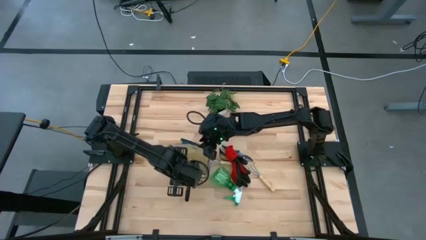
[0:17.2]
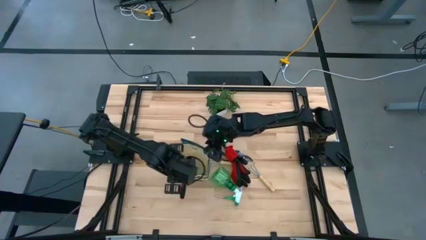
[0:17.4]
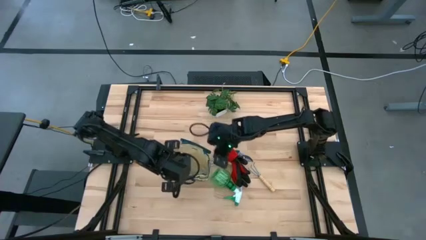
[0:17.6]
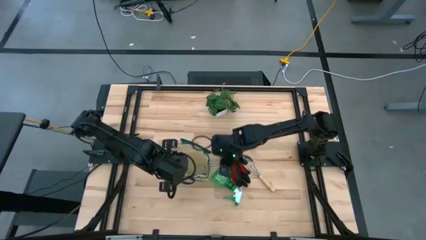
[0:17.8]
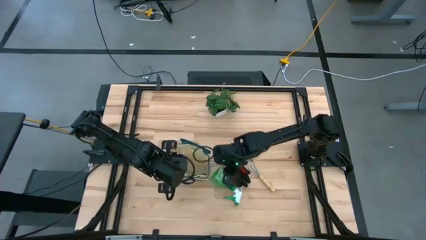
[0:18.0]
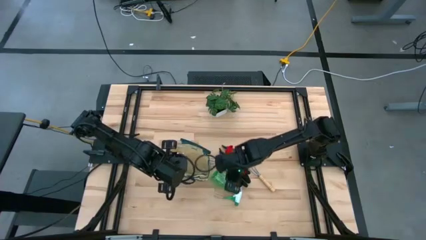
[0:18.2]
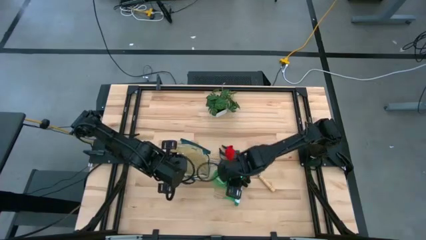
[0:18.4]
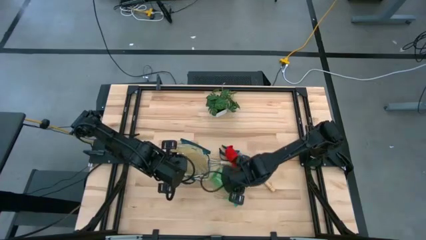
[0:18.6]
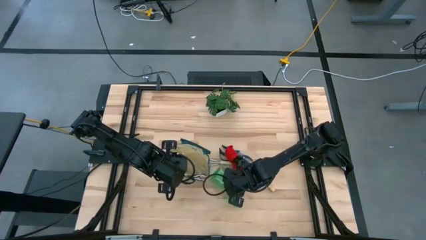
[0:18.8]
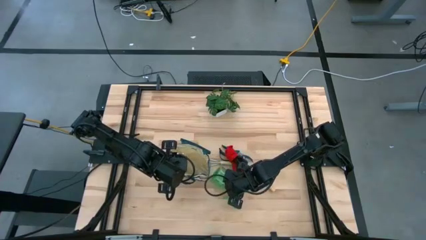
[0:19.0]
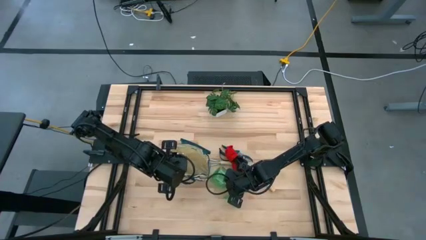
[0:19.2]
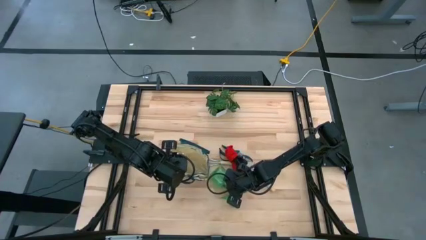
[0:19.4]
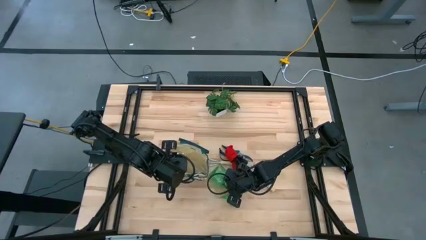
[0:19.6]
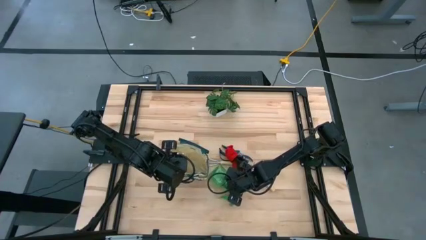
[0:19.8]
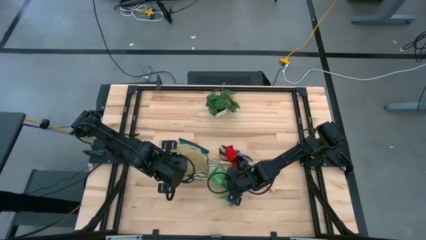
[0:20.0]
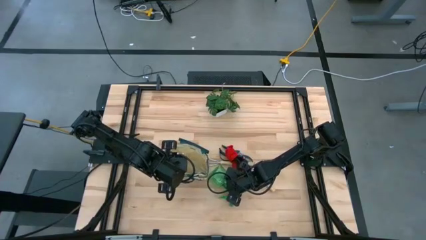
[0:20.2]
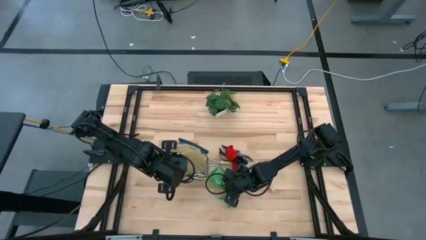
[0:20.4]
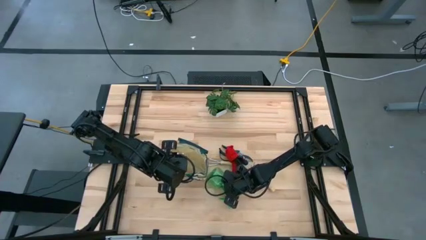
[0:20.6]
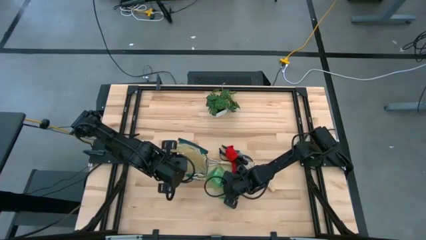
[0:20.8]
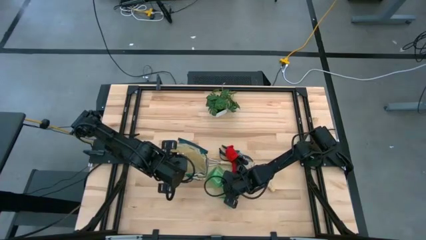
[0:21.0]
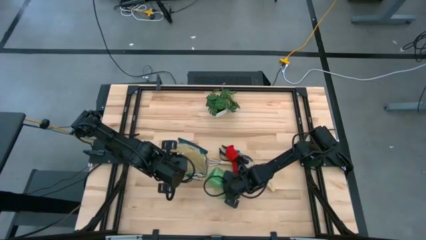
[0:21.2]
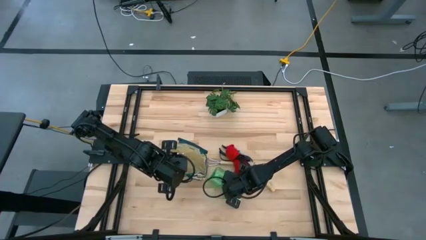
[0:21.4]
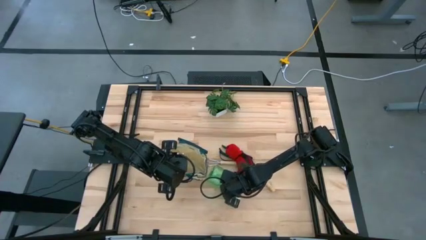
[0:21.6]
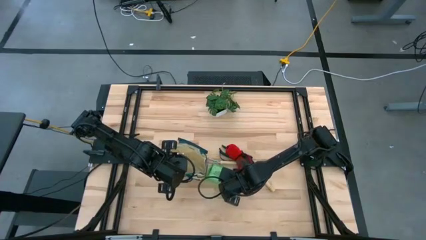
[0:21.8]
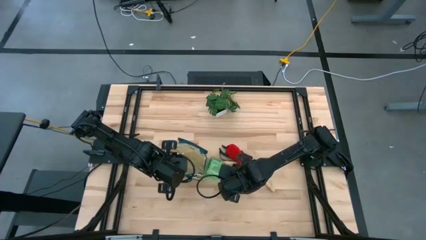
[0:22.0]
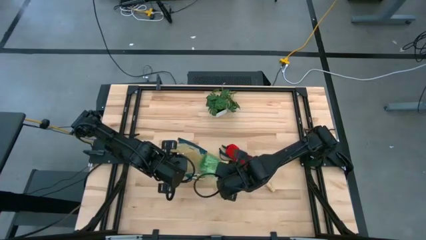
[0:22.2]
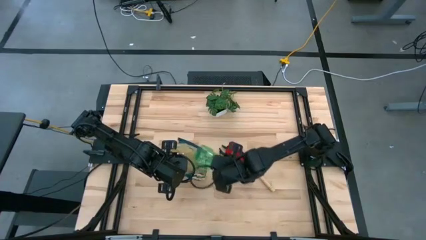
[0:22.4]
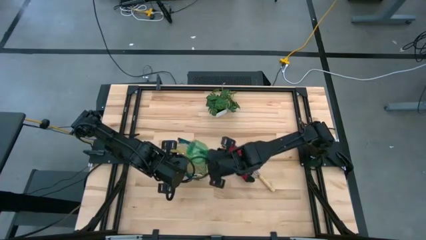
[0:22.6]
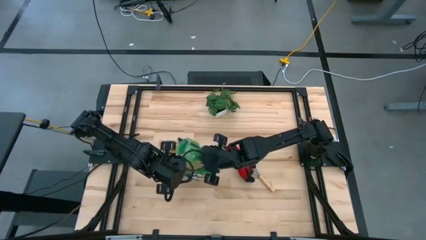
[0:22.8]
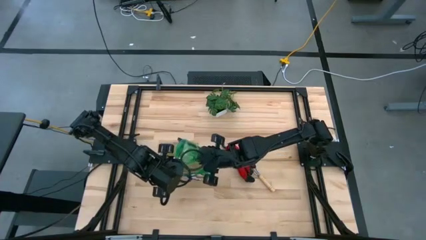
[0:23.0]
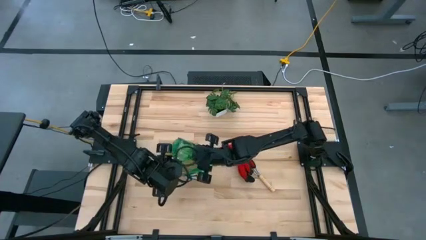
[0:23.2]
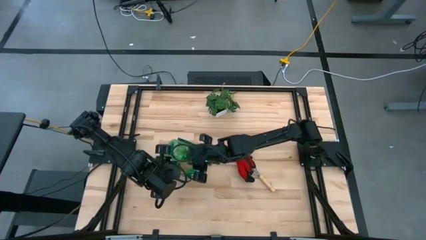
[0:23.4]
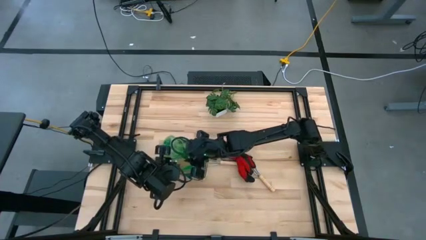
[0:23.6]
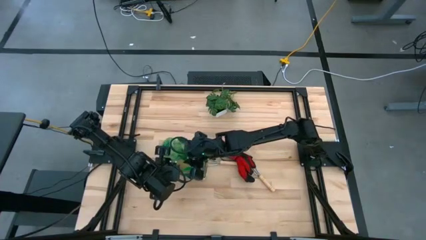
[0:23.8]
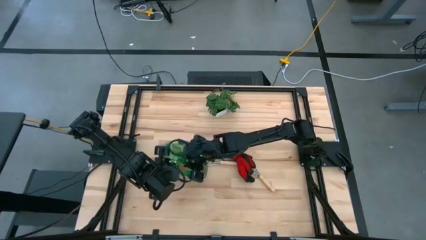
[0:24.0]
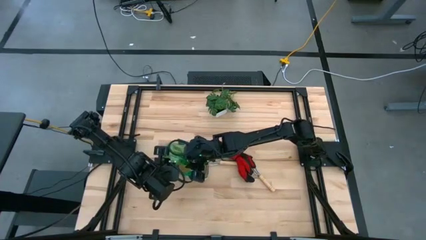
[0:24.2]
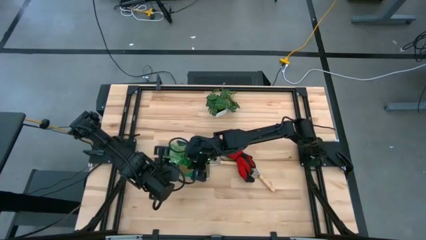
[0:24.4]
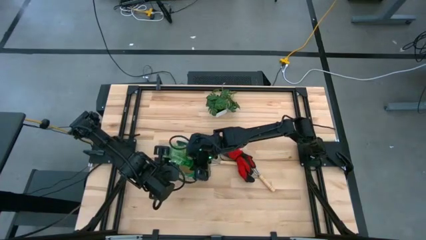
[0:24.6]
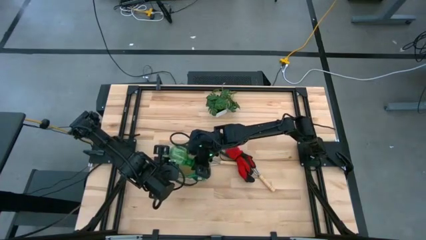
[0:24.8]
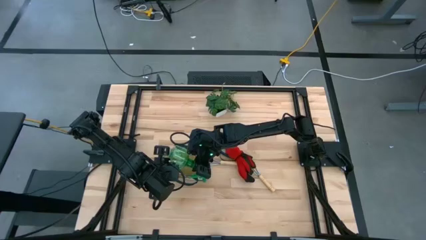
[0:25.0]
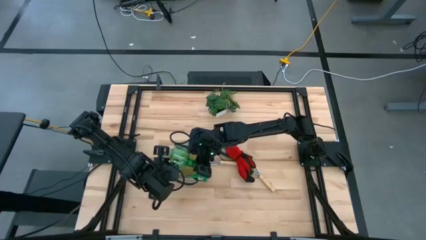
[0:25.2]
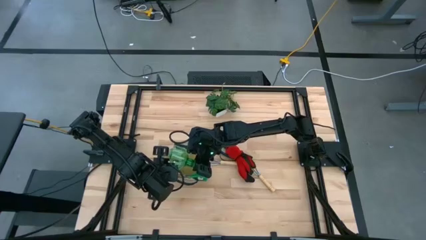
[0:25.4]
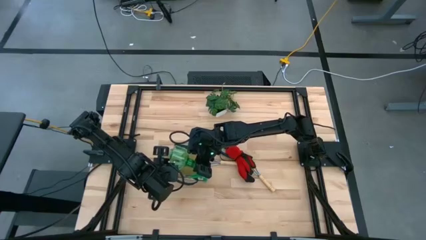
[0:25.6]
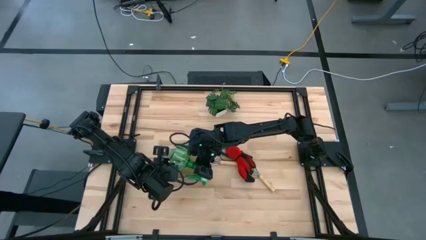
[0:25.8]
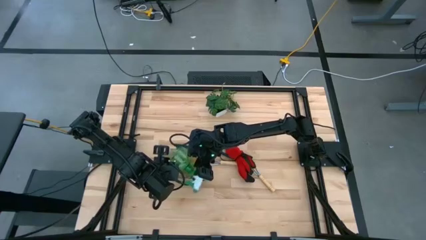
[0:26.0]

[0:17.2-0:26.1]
Task: Pick & Place Garden tools in Gardening bag
Put the green spray bottle into the green gardening bag

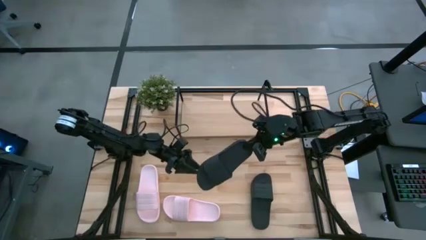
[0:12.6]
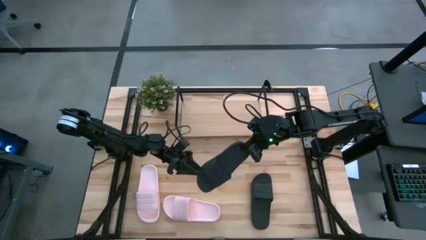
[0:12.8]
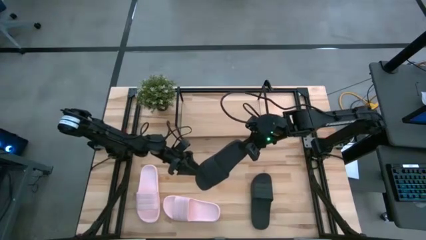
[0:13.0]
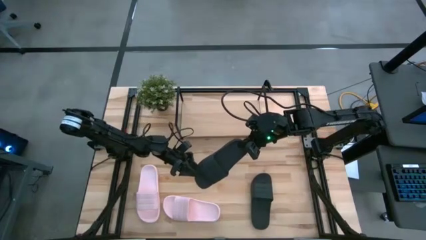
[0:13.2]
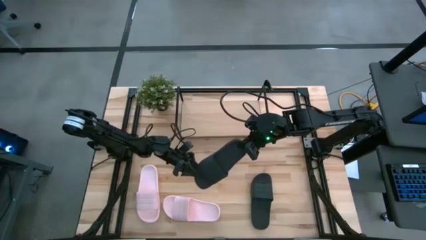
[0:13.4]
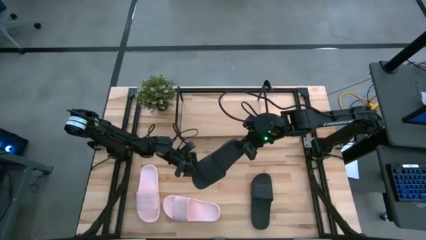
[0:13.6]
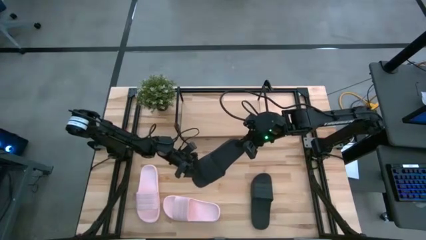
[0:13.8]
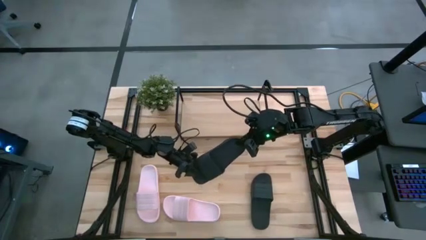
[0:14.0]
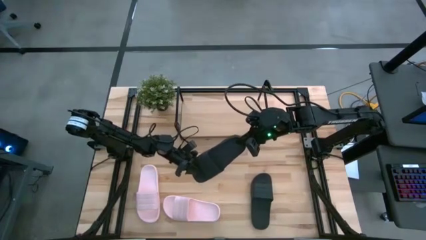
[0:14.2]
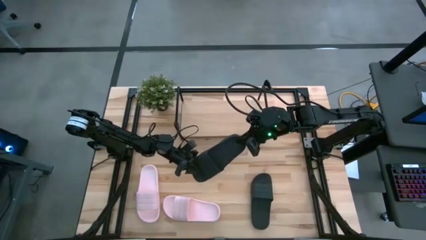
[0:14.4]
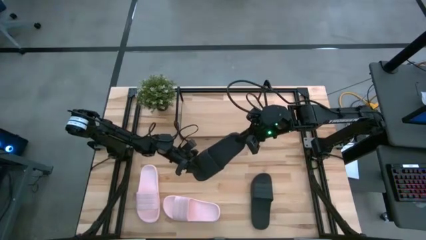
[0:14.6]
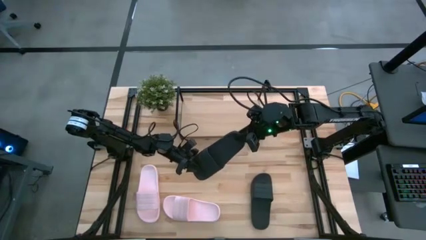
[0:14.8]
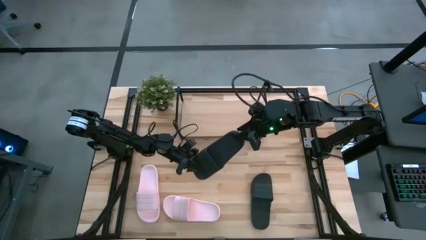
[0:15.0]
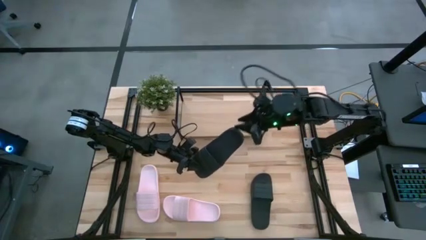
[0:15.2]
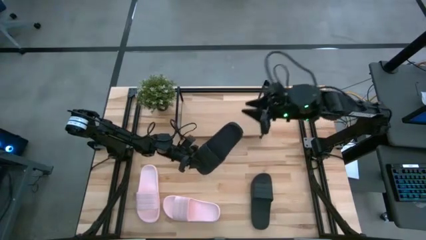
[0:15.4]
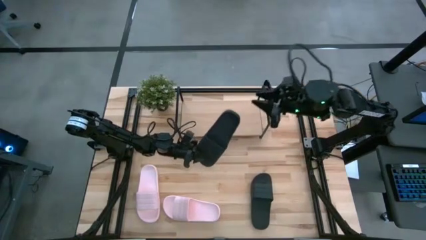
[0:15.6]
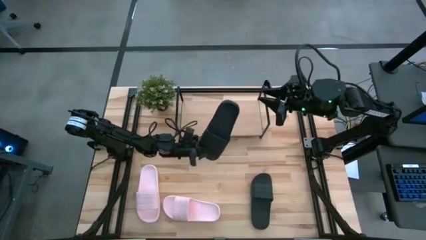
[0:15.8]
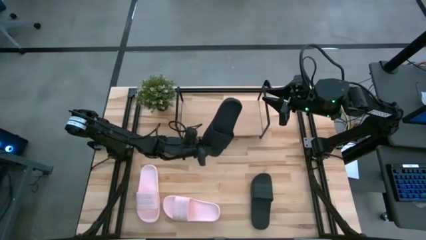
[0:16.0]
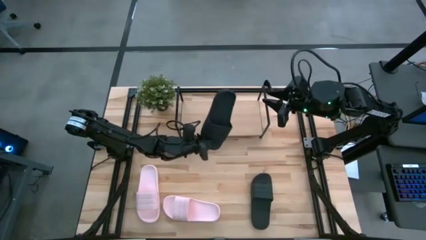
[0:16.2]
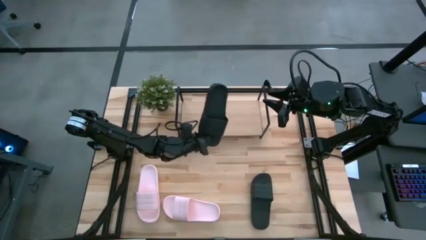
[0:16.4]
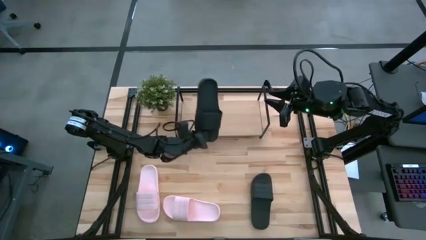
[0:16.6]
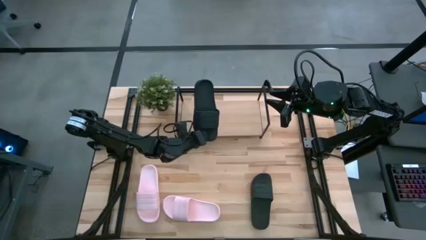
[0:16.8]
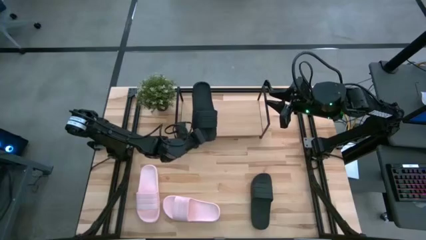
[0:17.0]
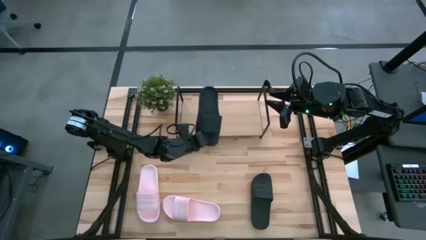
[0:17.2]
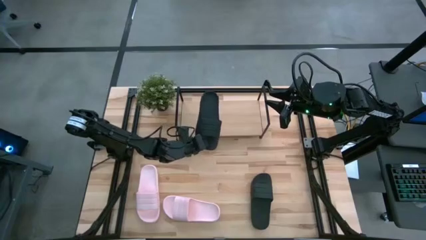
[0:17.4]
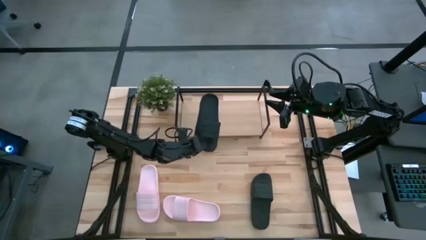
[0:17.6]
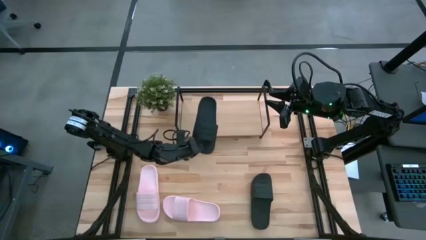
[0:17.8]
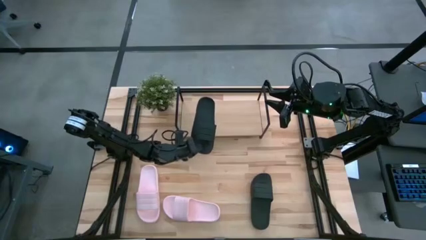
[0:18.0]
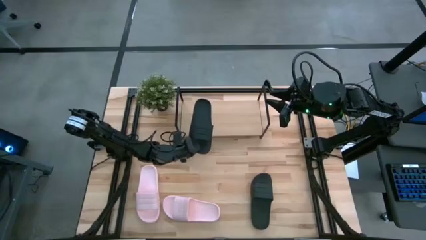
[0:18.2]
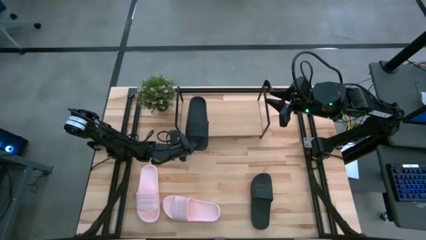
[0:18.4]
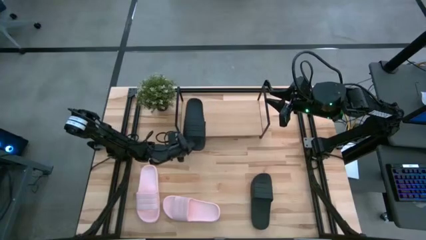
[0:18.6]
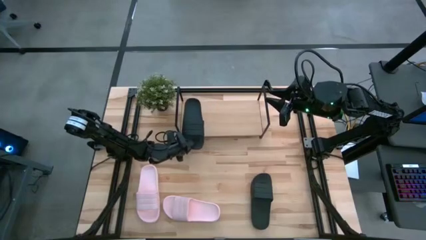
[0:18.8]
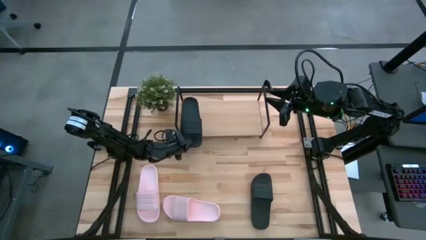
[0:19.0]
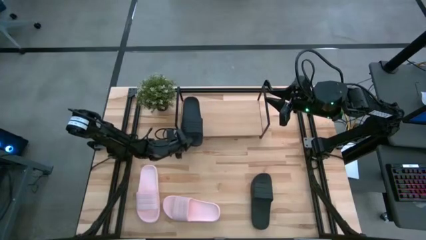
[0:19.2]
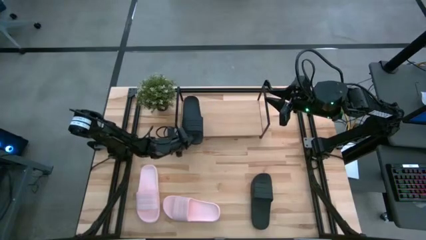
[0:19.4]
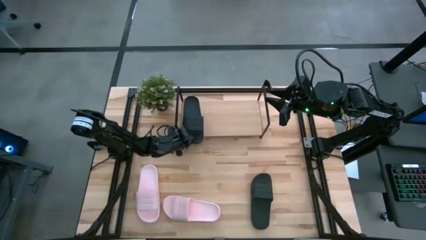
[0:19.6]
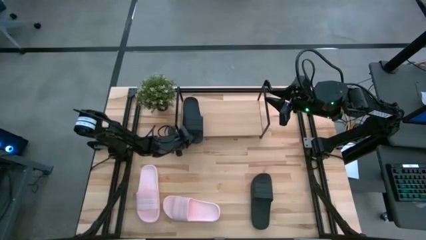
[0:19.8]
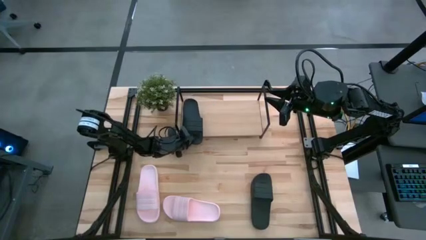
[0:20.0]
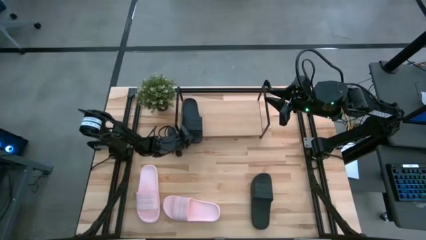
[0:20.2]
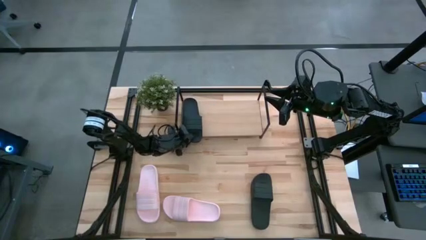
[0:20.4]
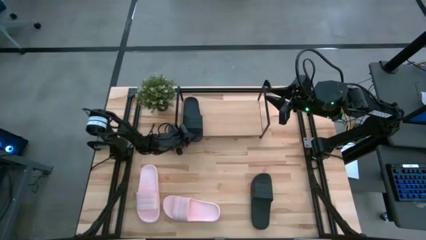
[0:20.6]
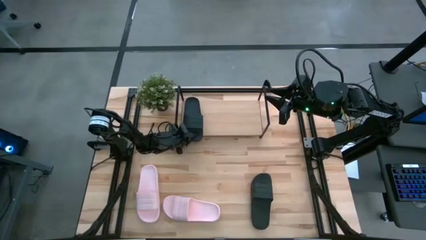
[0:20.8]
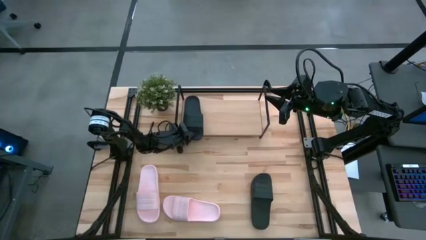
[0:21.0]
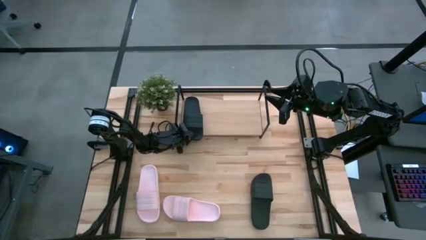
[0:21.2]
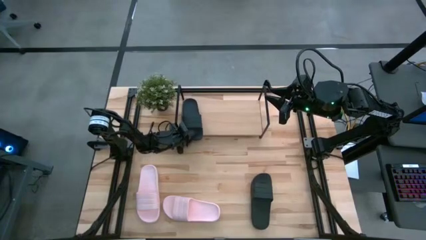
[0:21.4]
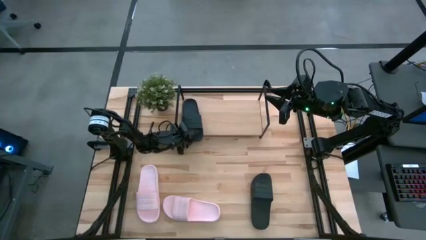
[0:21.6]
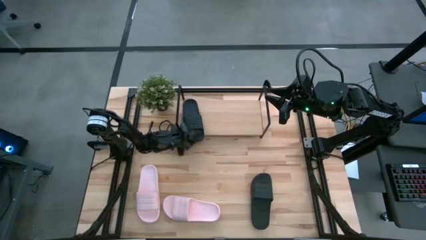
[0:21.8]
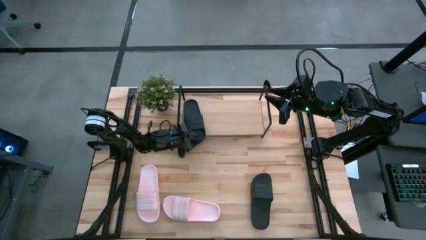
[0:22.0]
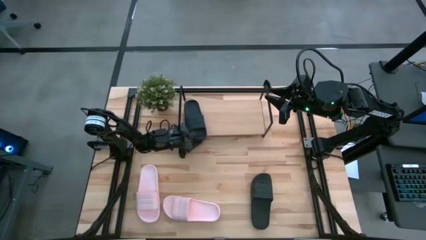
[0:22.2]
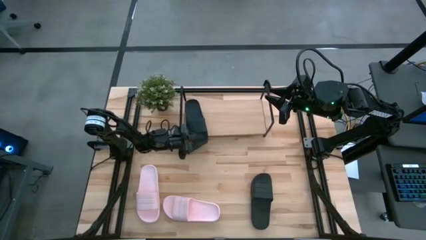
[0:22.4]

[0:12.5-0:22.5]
Task: Pick and place slides into the shelf
Put the top black slipper on the shelf
